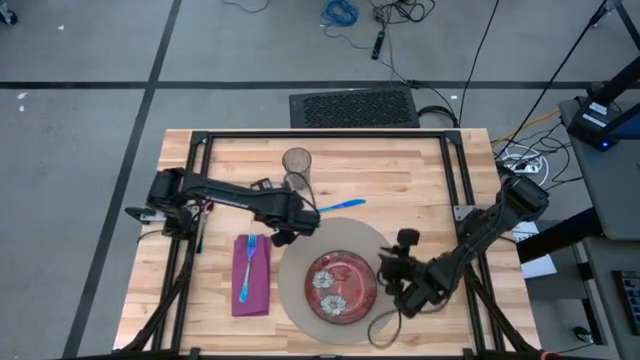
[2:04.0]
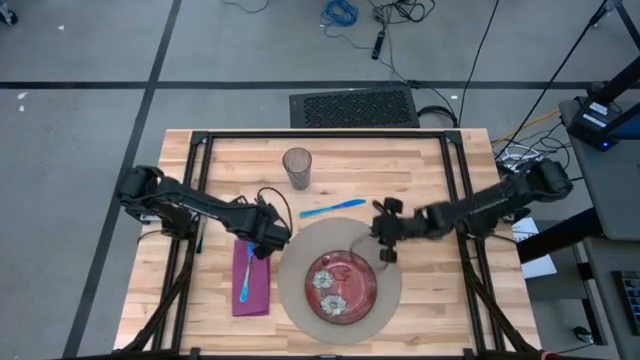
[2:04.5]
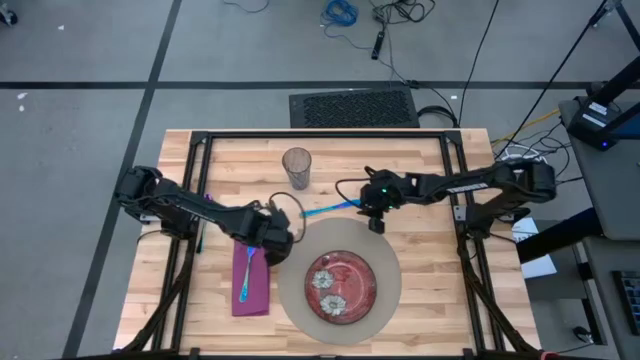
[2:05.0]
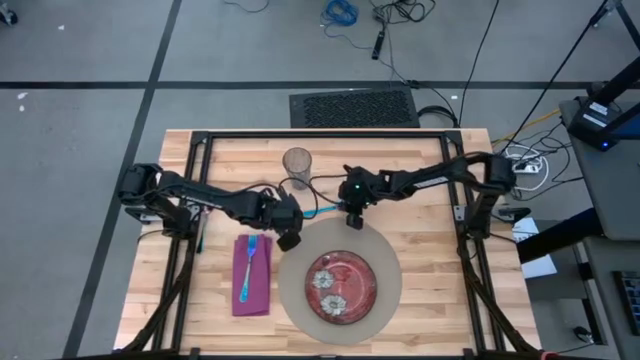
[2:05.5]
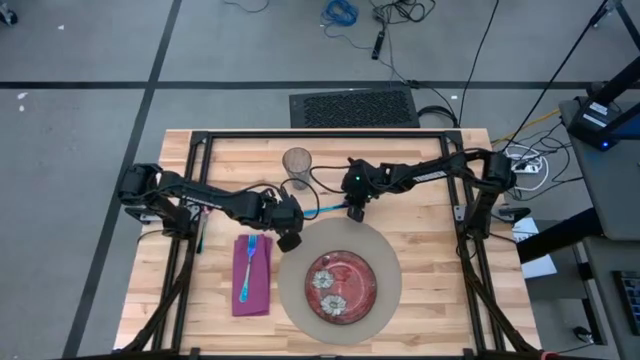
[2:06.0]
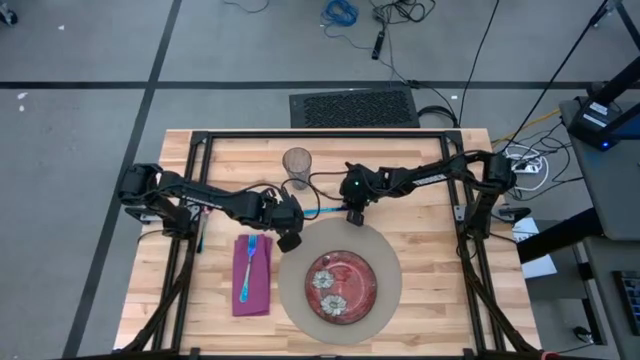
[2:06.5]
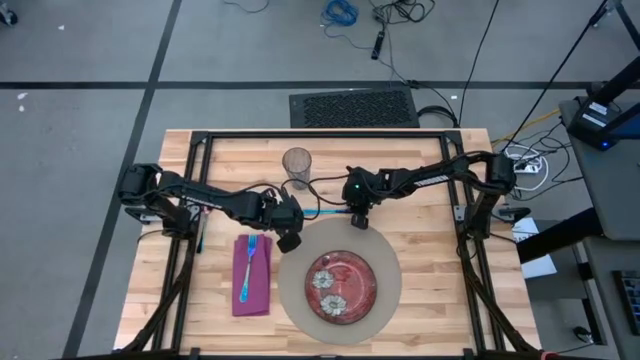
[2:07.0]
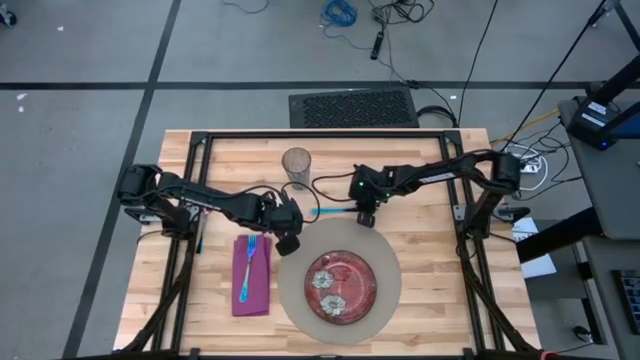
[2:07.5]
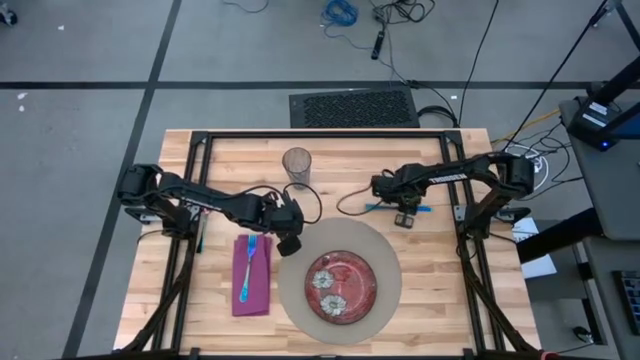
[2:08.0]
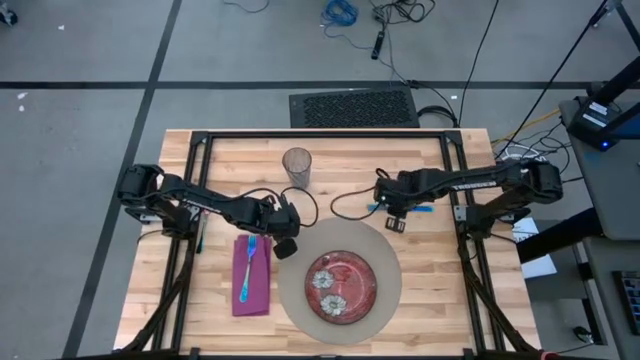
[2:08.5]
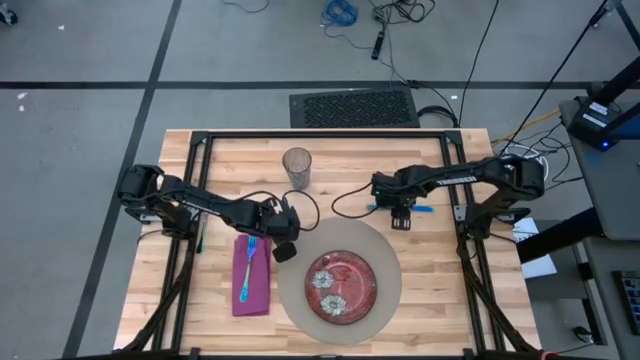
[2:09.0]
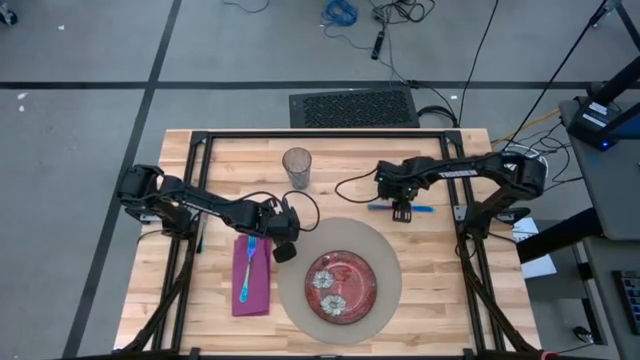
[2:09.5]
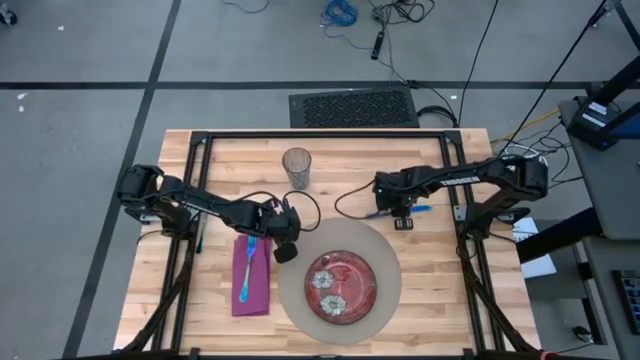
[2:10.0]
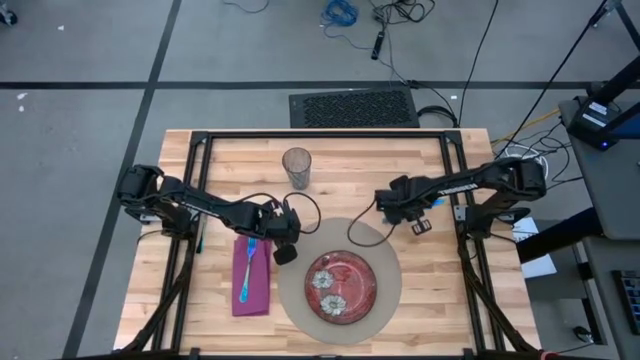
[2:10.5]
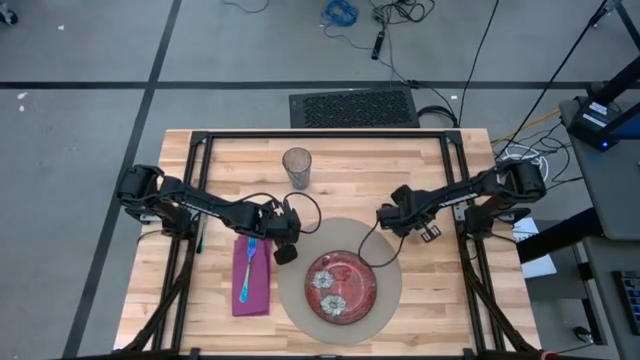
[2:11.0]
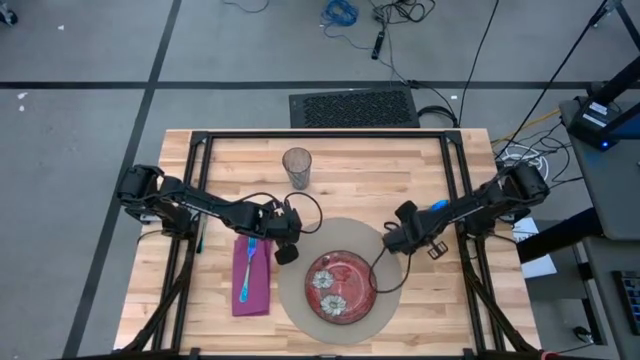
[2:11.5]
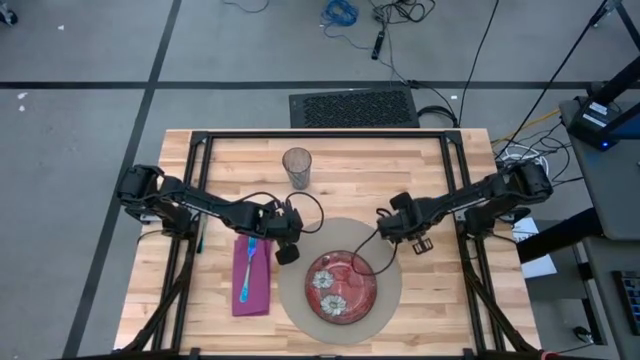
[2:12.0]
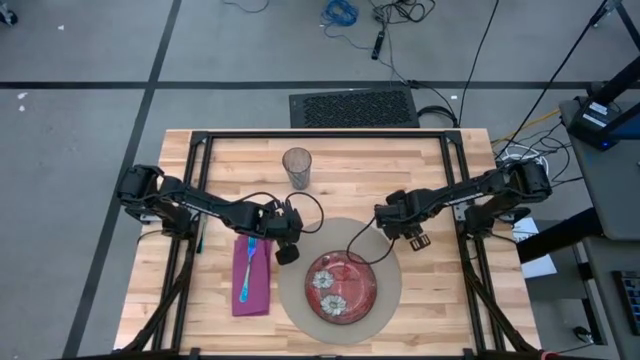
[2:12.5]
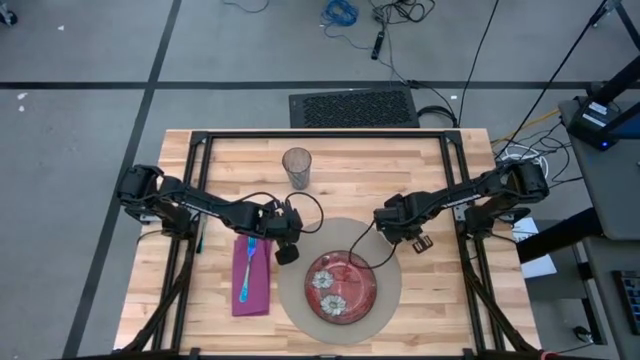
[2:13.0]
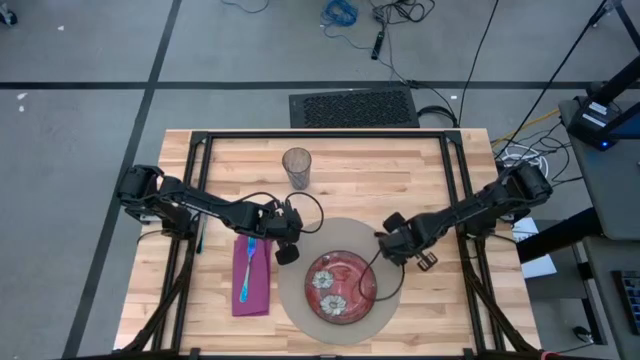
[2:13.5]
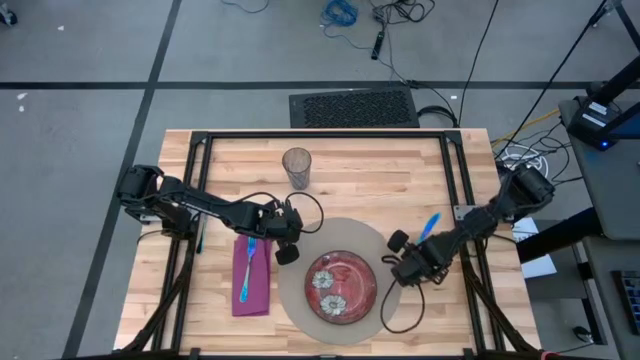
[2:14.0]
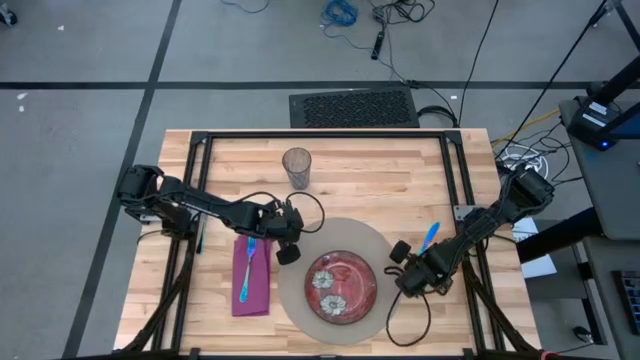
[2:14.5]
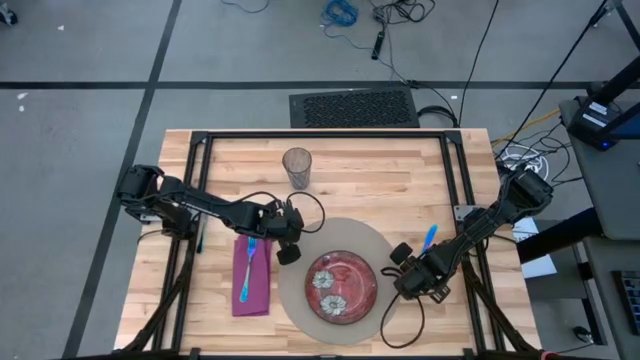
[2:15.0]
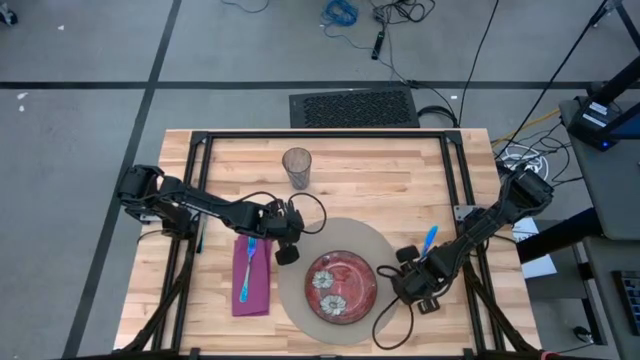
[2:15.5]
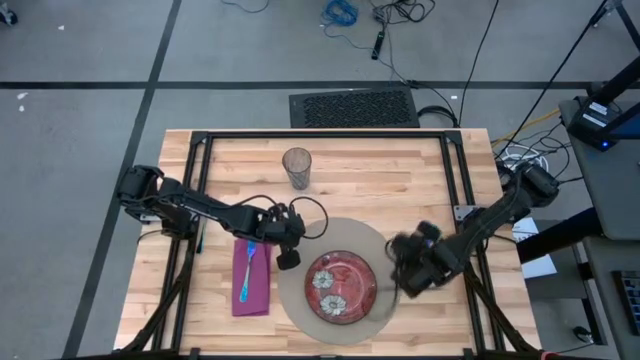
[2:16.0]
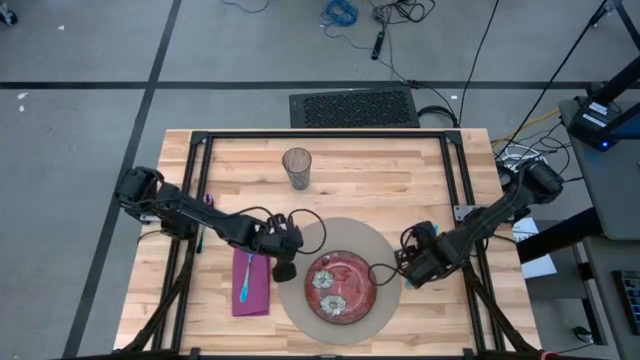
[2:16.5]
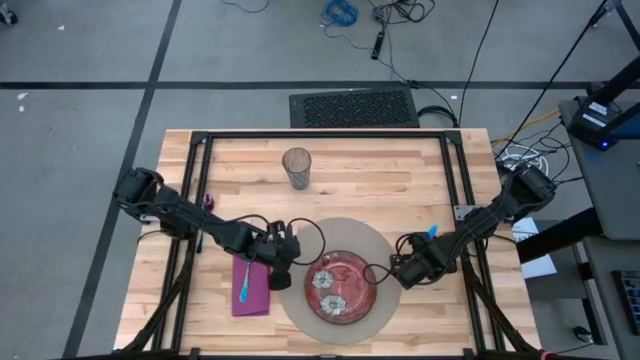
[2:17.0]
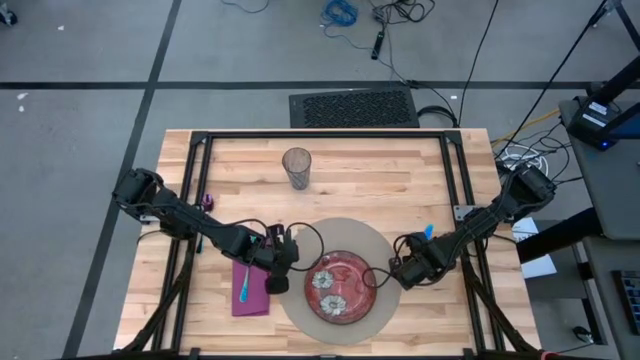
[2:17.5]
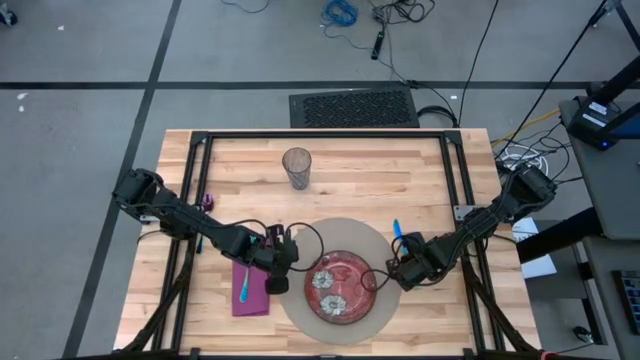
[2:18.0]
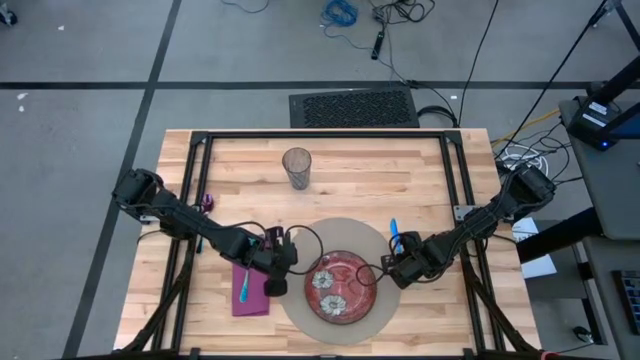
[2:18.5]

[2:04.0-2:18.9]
Task: Set table place
Move the blue table knife to the right side of the gray placemat

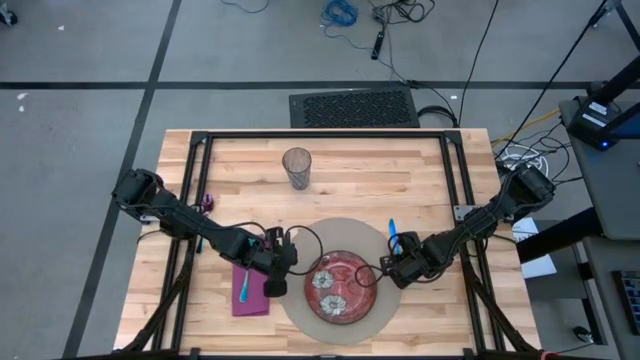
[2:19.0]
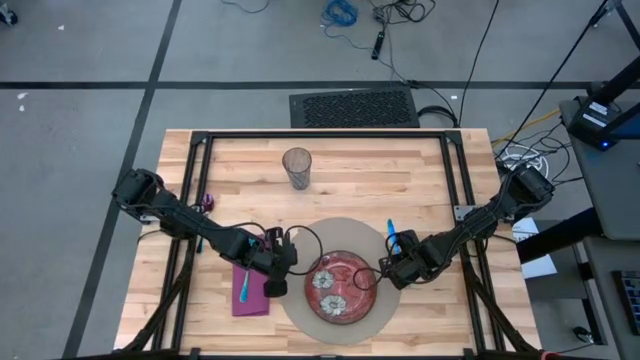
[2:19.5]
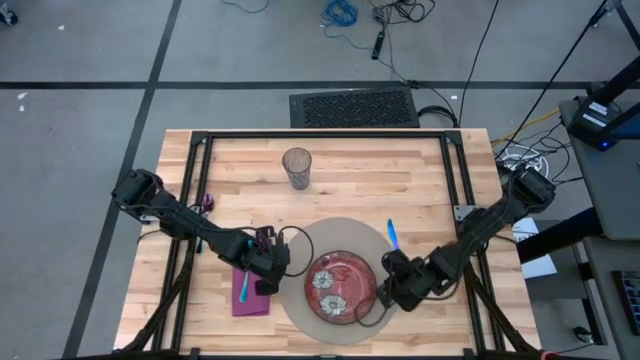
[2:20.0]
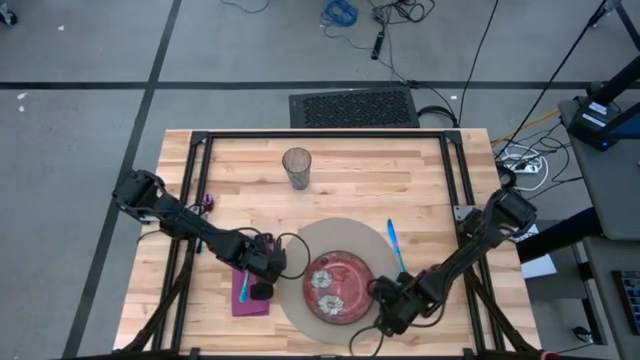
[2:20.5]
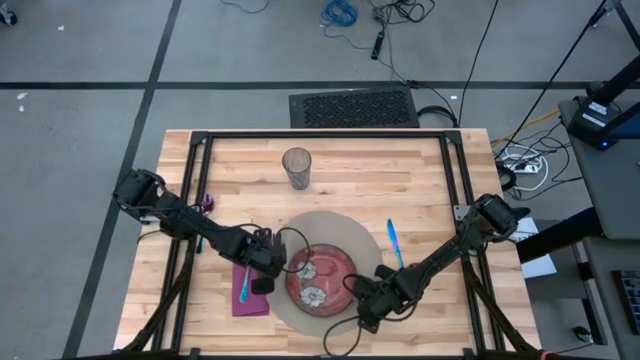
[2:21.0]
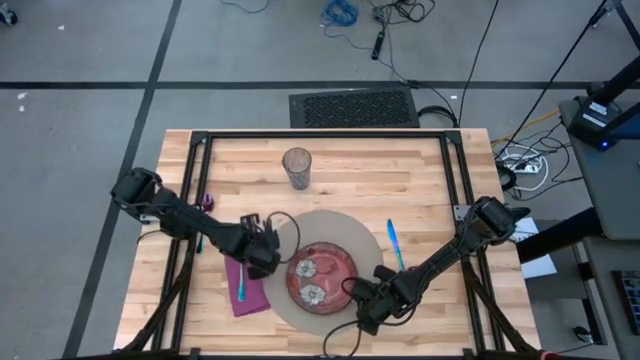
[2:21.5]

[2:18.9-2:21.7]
Adjust the gray placemat

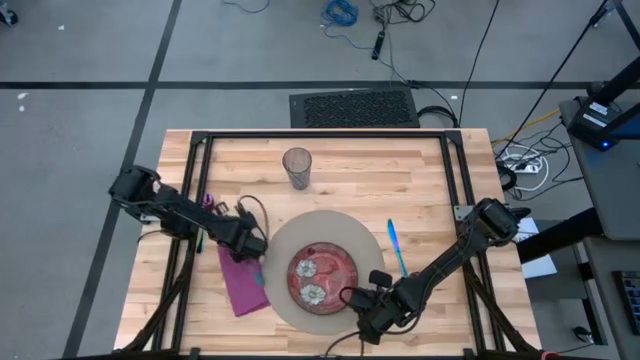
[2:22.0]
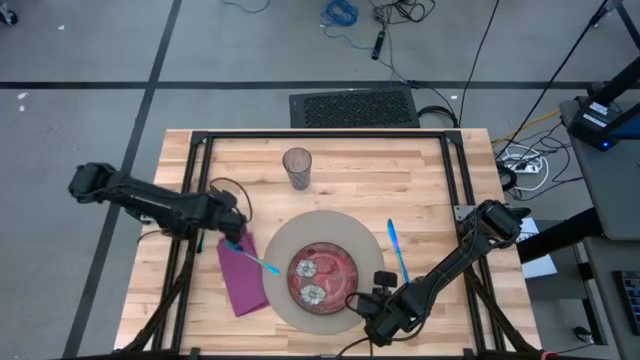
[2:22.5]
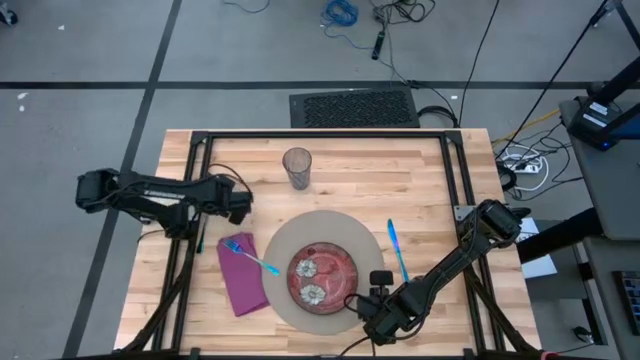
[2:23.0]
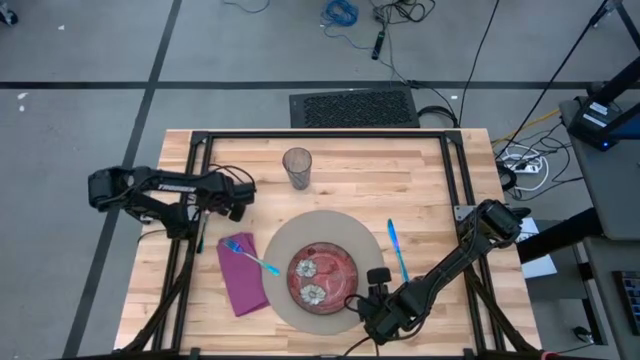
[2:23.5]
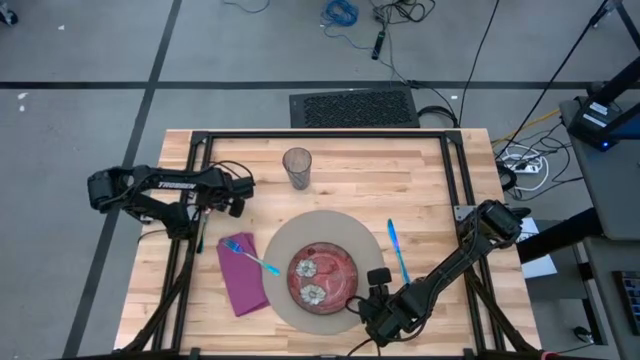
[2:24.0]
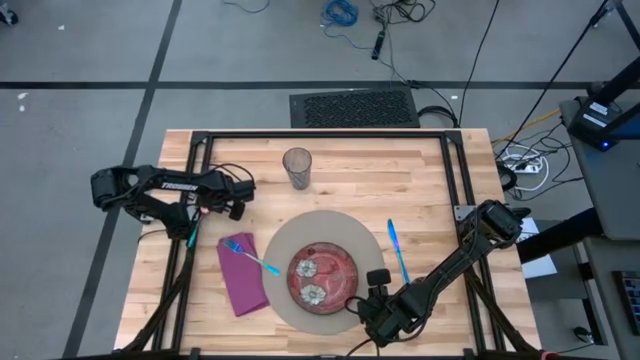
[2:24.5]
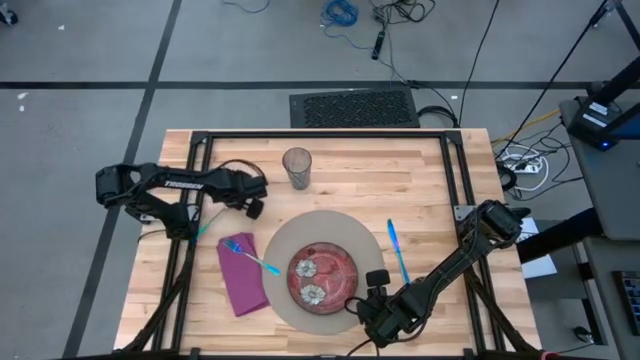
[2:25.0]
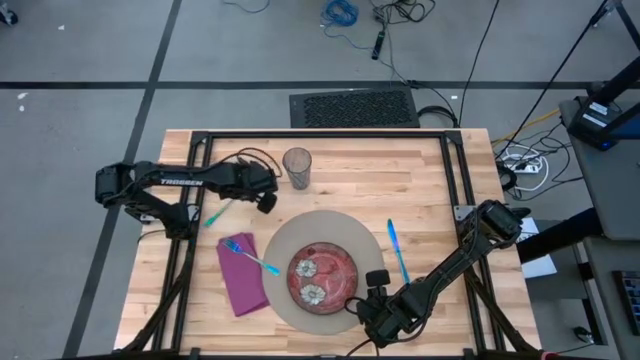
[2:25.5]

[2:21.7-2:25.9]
Put the pink spoon on the right side of the blue table knife
